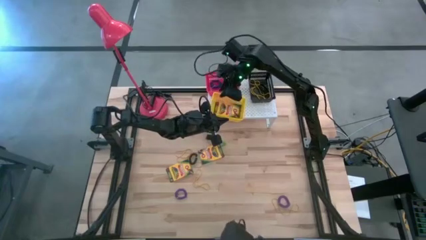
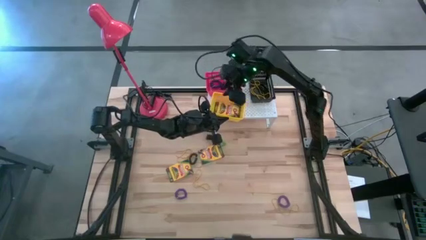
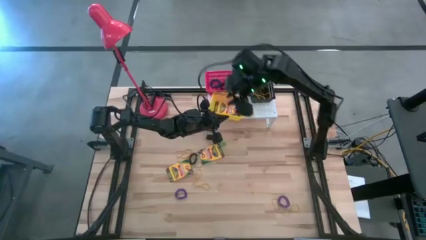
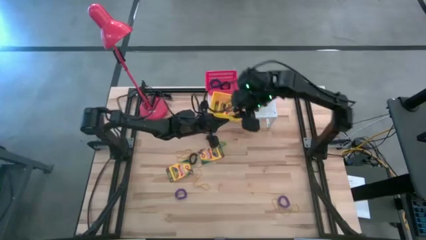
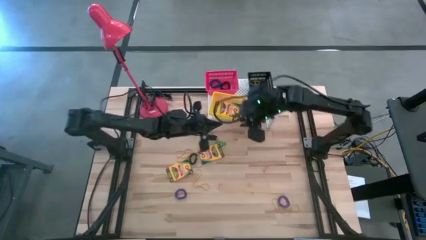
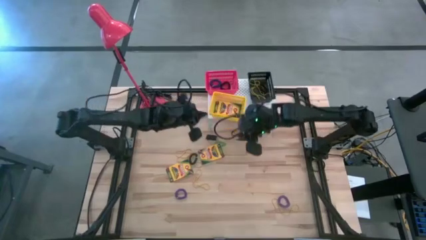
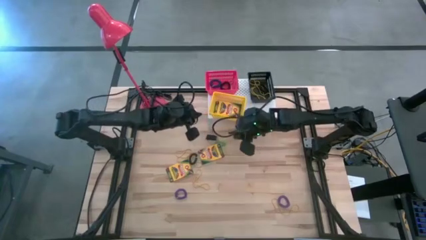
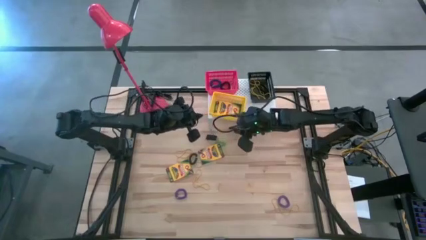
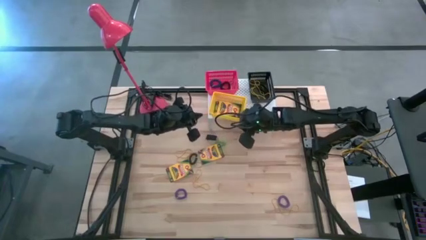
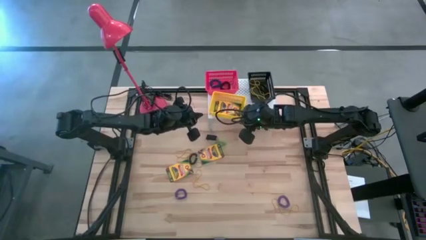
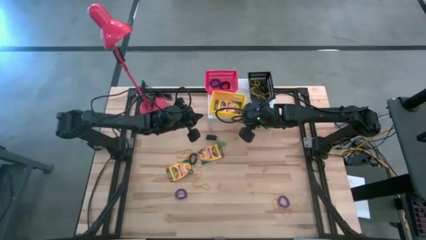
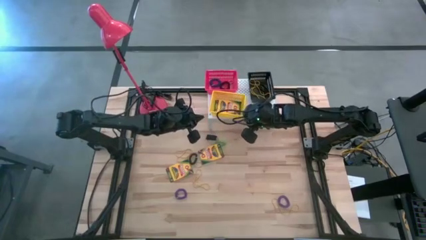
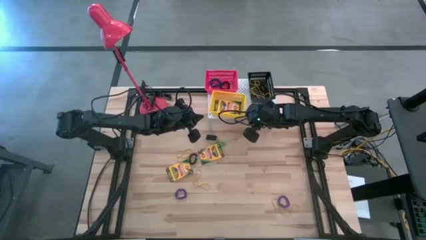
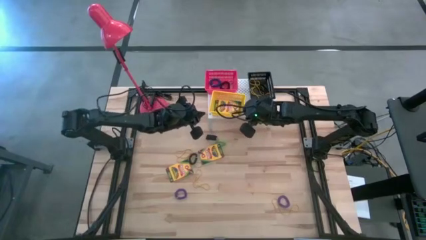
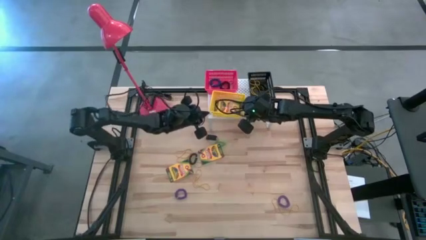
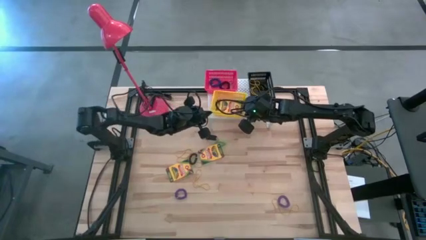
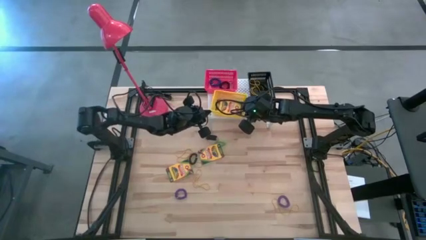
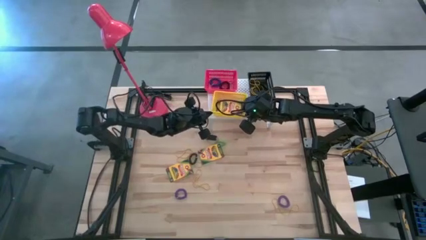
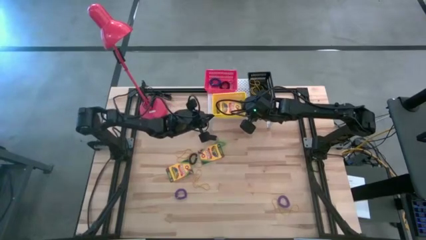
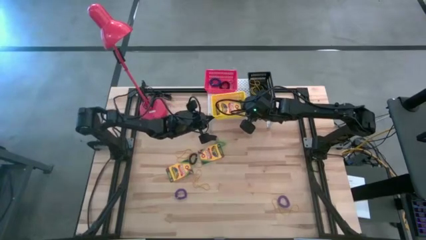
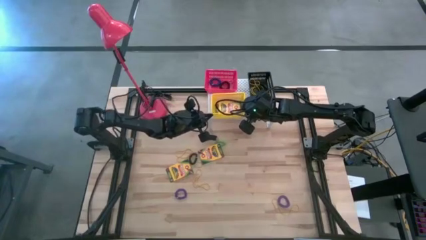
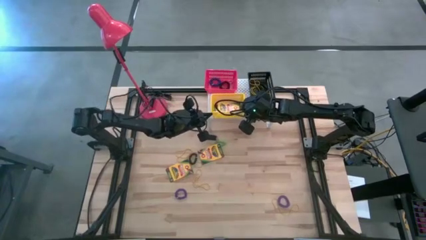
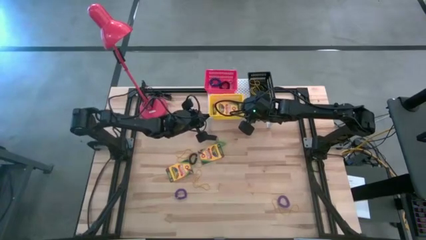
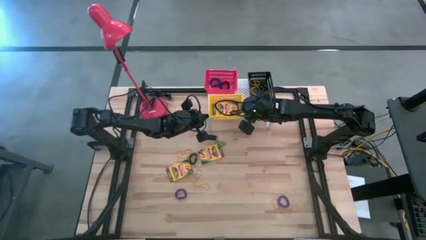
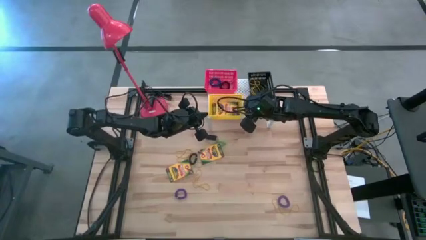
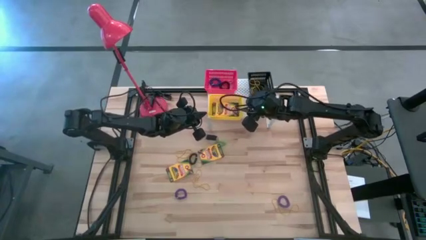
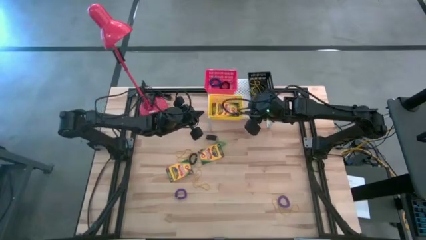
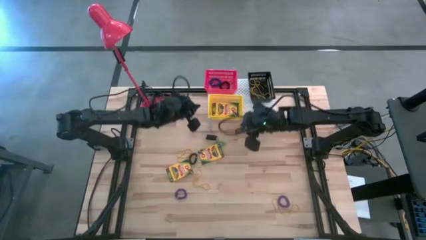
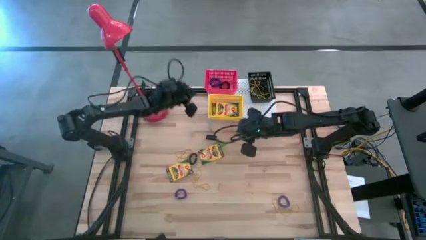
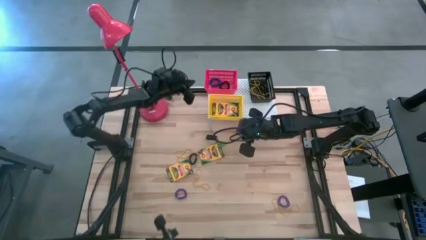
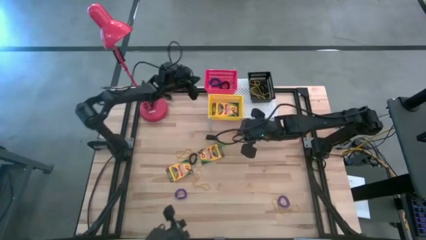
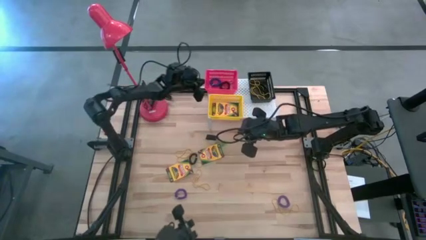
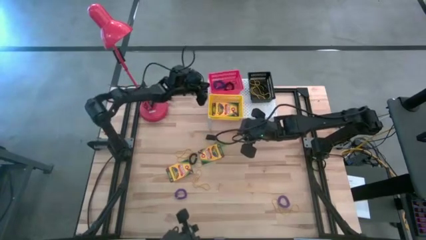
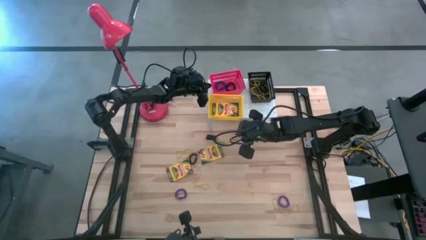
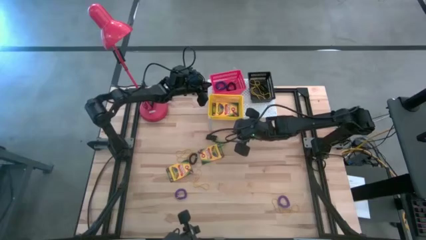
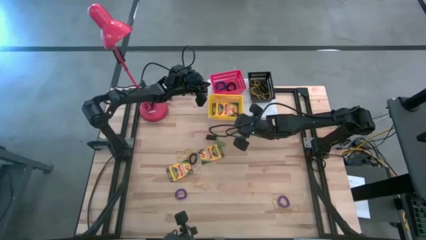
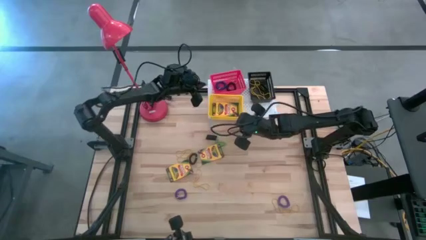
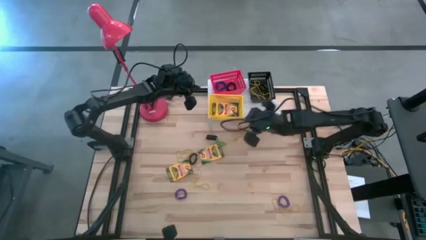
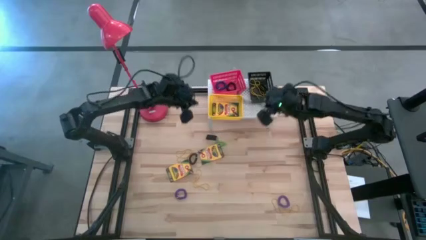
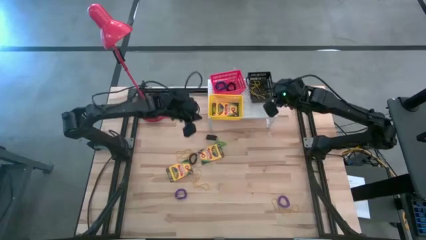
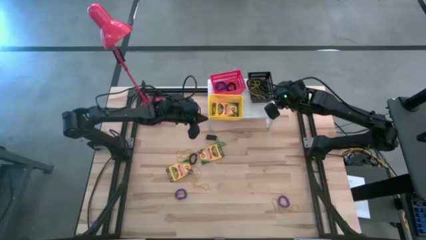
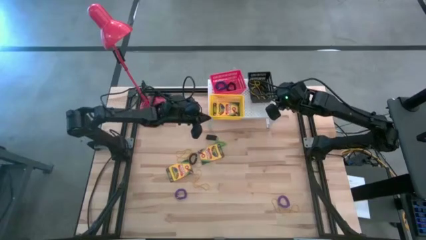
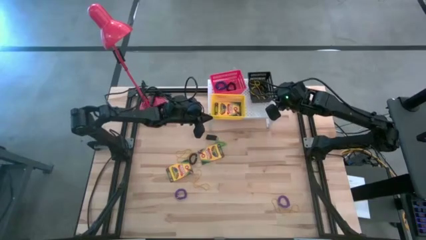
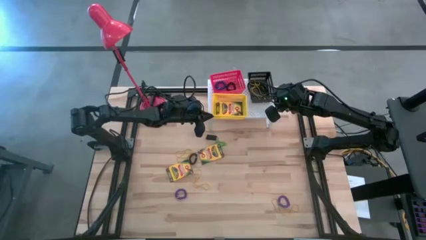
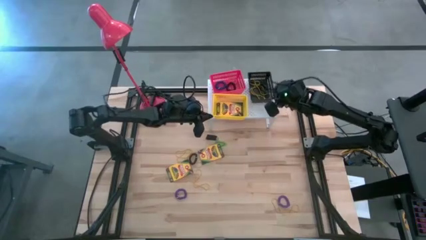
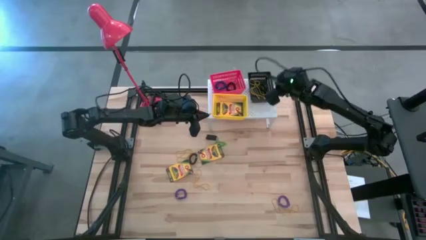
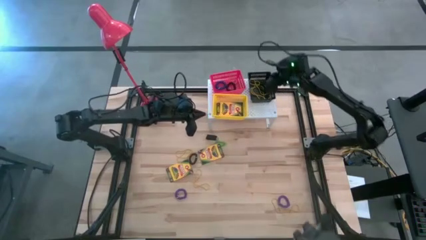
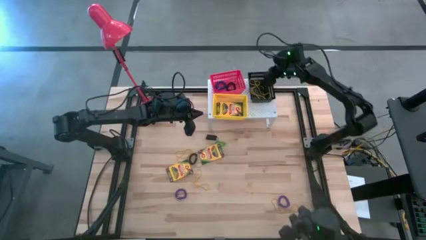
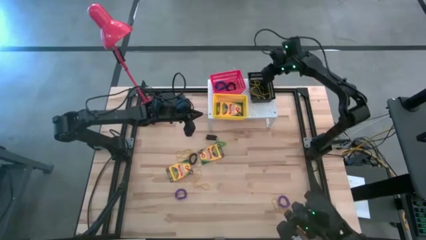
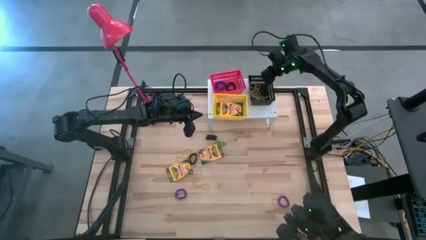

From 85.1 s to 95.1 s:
Task: Pick & Place Office Desk Supplies
Adjust the bins on the shelf

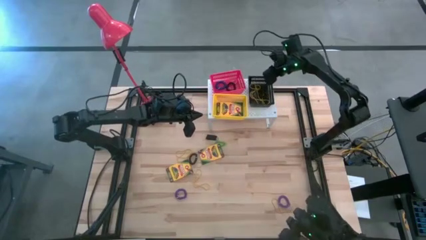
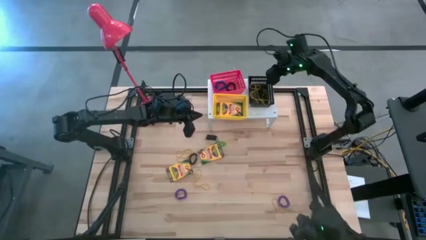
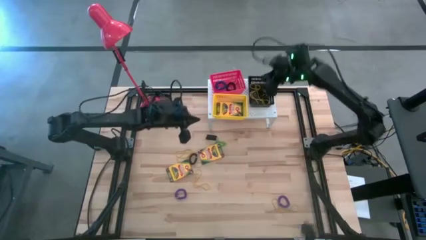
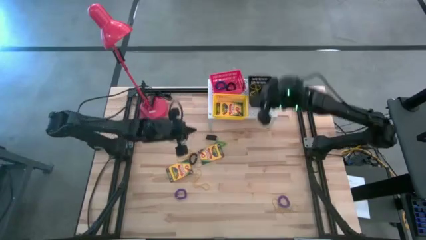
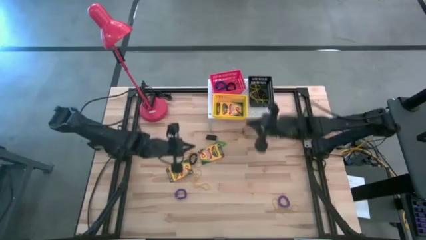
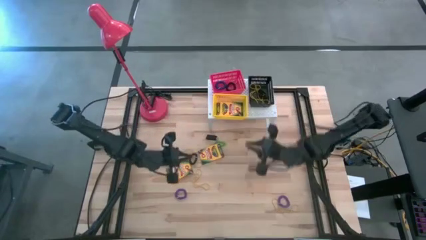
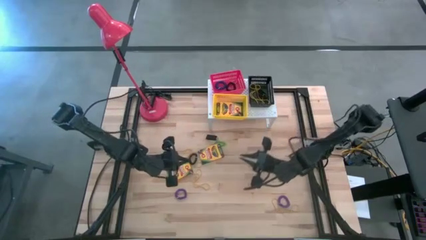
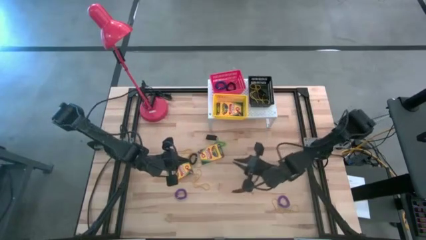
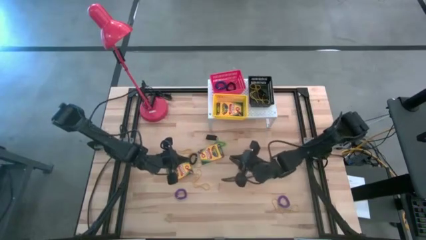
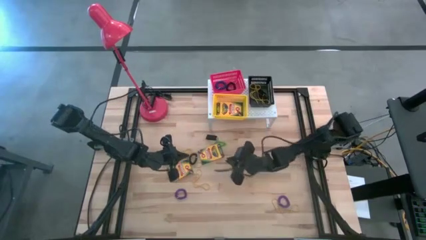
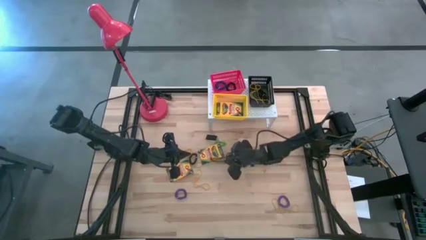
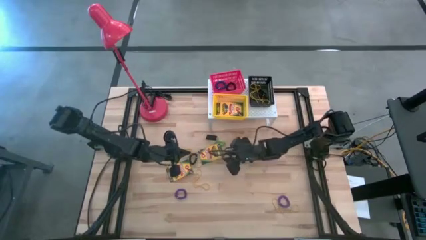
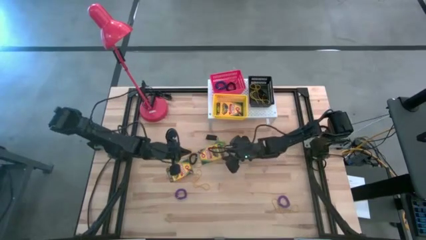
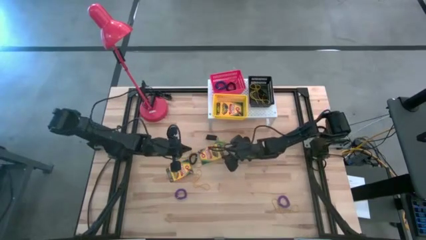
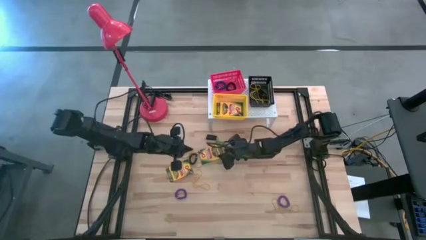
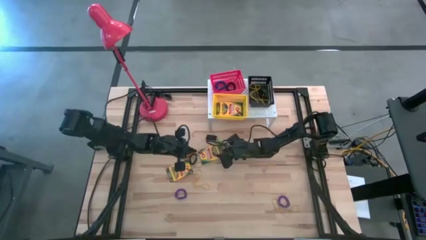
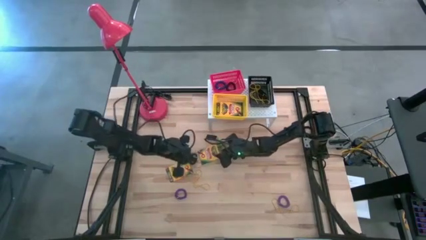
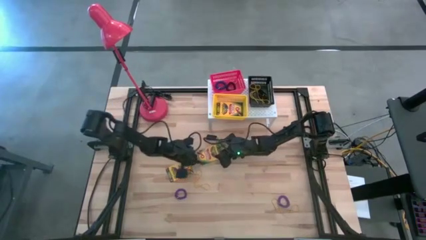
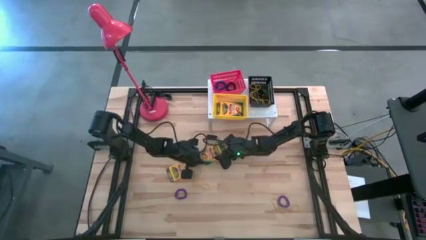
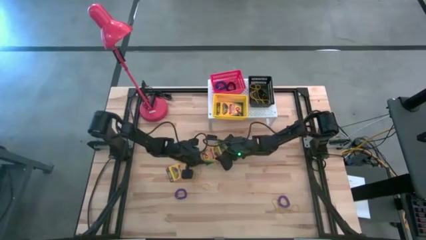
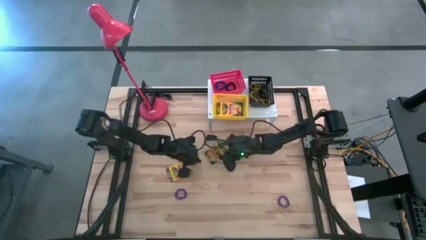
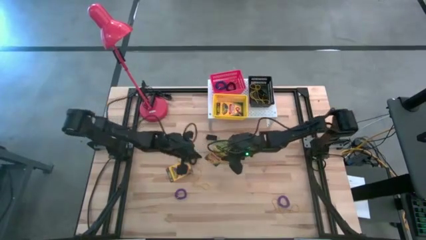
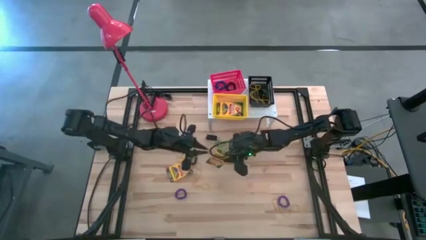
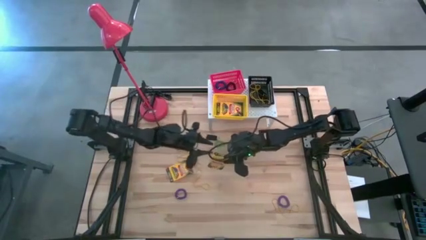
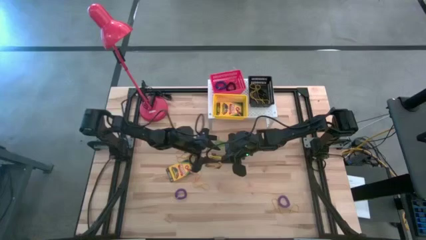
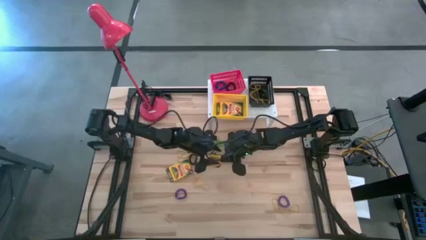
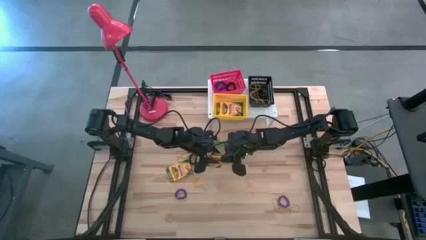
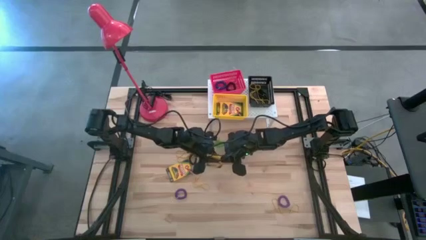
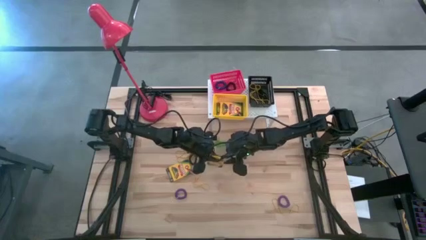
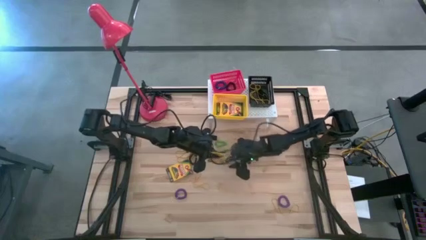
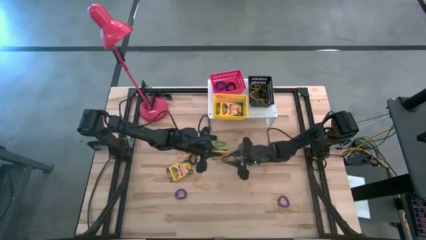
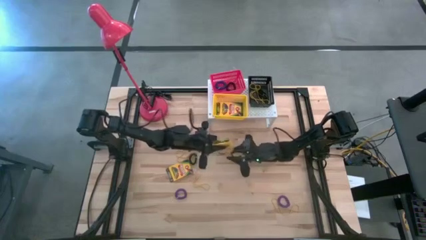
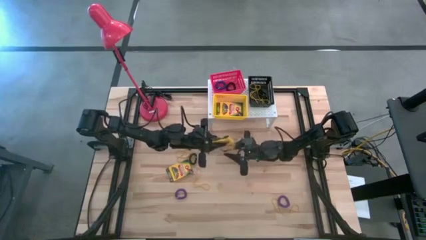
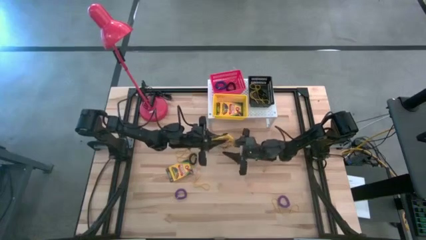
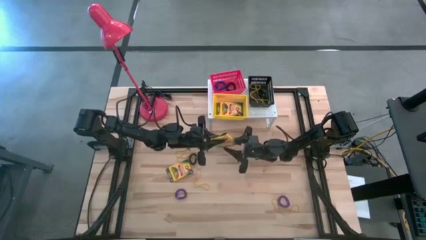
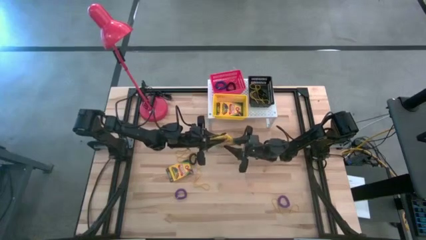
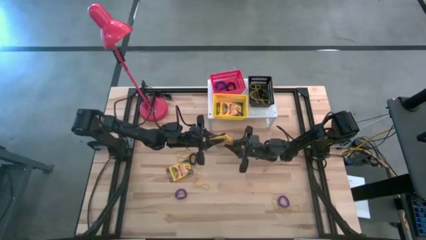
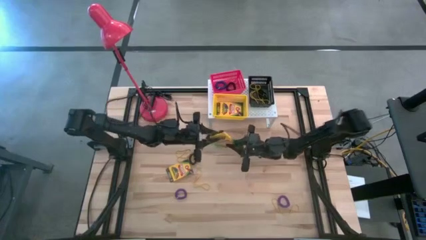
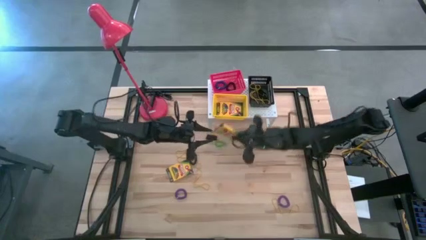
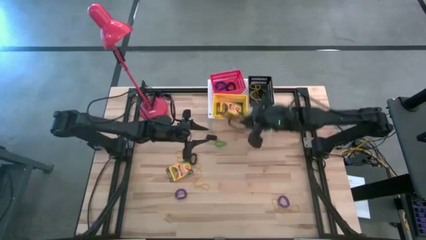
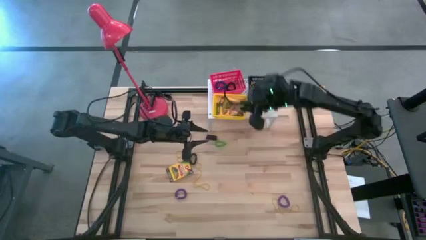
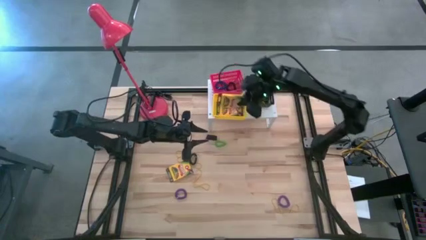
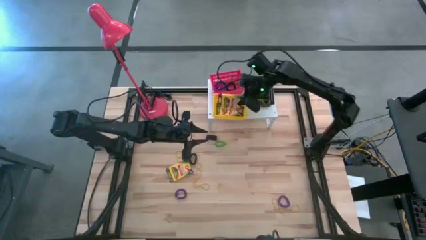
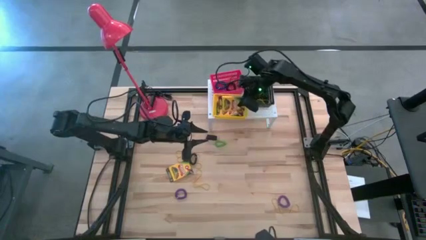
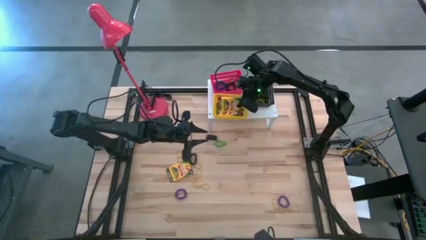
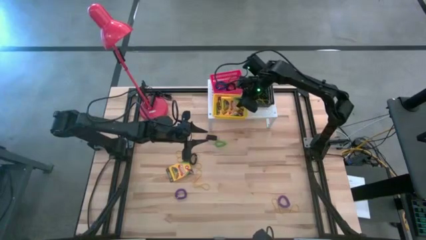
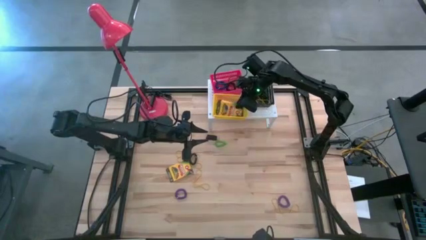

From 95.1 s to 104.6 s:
Put the crayon box into the yellow bin on the shelf
